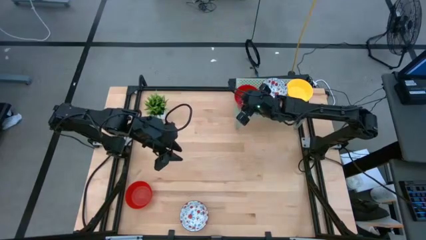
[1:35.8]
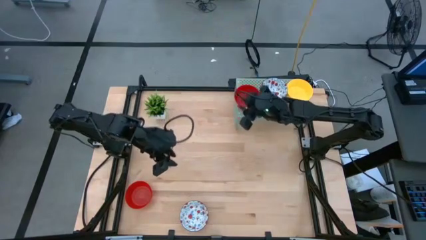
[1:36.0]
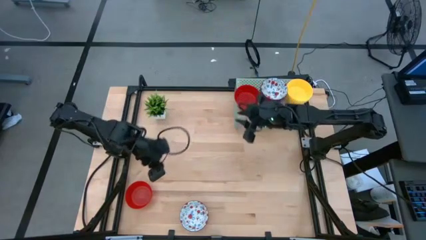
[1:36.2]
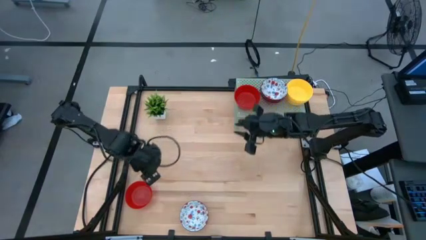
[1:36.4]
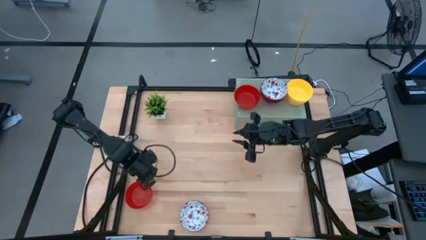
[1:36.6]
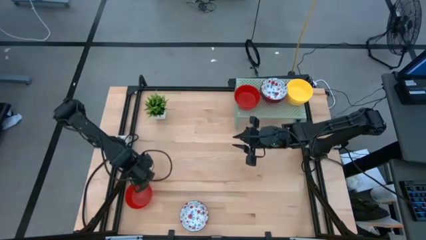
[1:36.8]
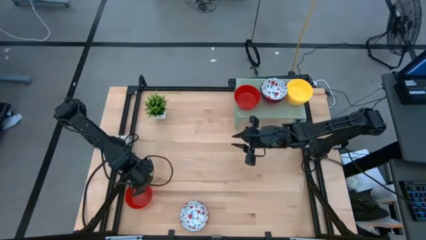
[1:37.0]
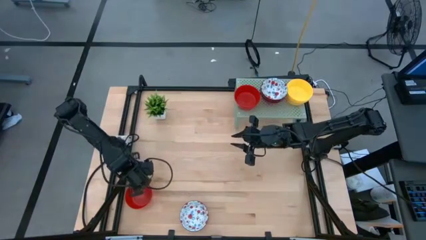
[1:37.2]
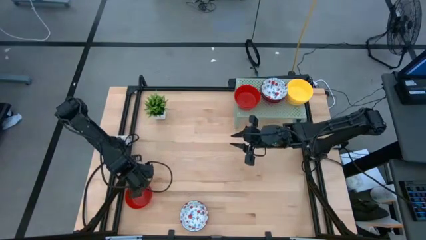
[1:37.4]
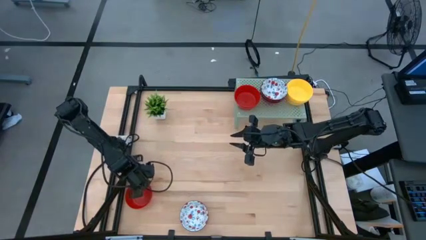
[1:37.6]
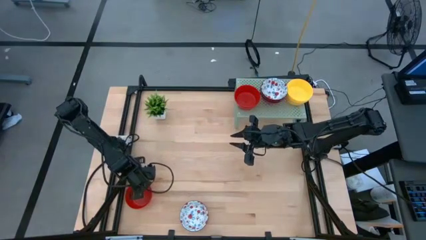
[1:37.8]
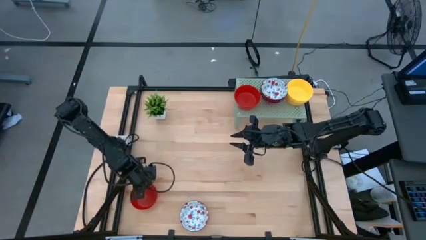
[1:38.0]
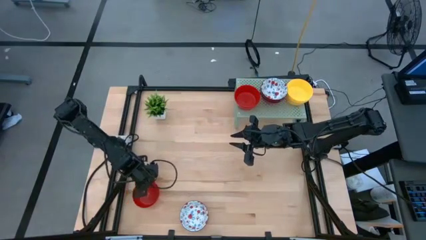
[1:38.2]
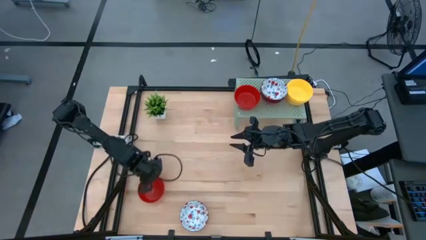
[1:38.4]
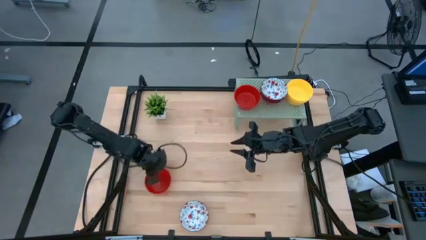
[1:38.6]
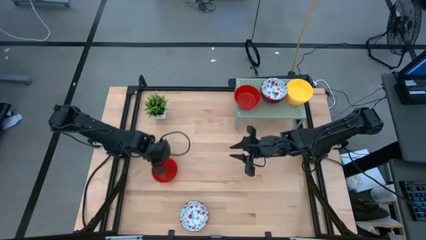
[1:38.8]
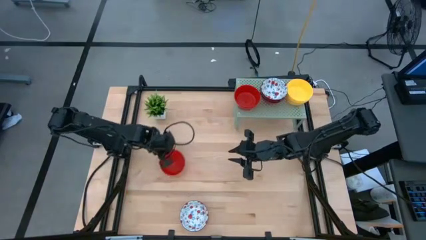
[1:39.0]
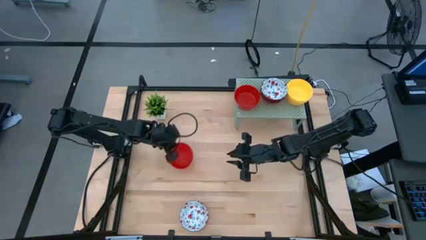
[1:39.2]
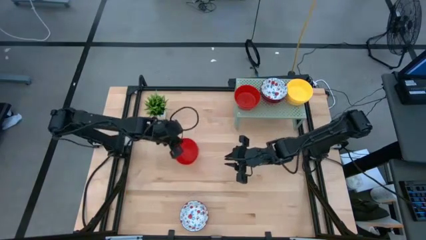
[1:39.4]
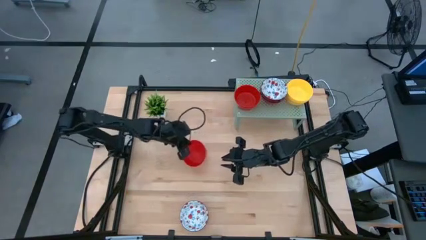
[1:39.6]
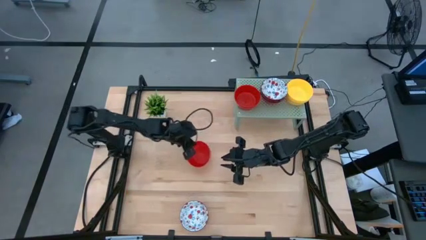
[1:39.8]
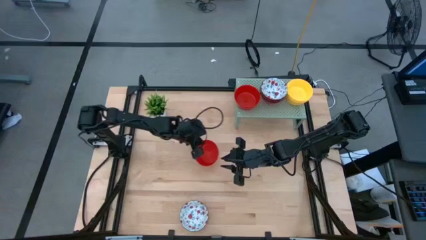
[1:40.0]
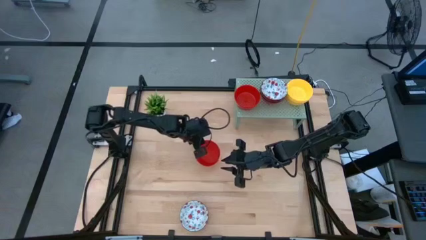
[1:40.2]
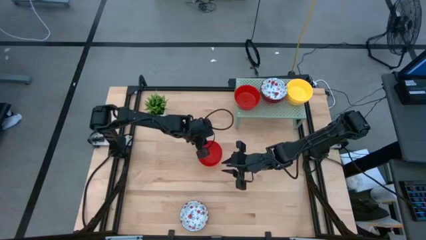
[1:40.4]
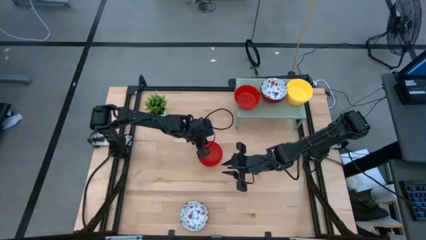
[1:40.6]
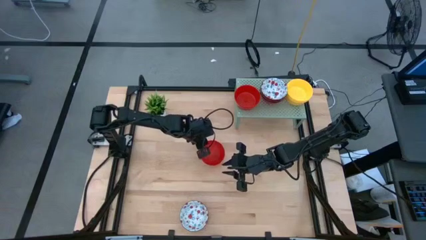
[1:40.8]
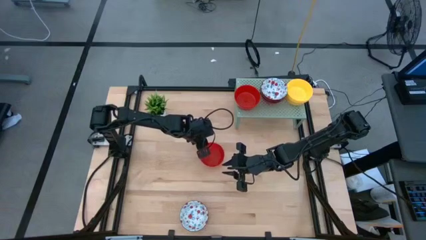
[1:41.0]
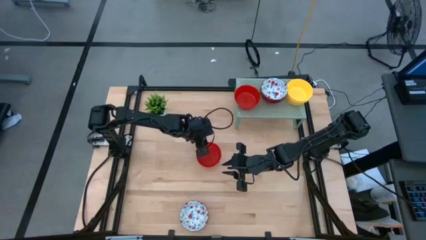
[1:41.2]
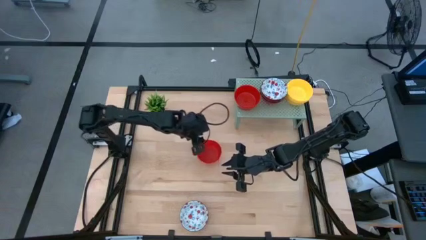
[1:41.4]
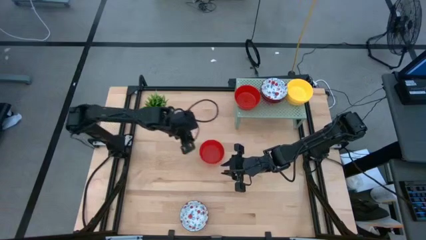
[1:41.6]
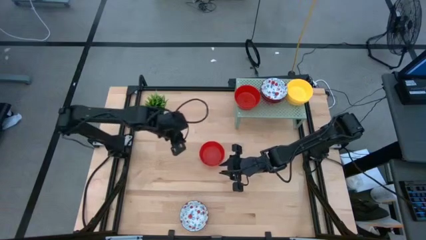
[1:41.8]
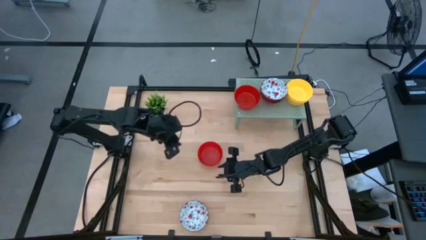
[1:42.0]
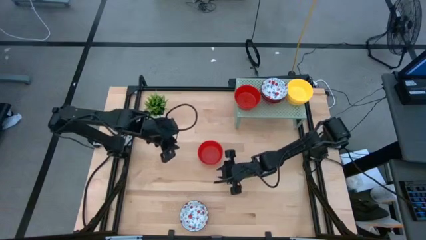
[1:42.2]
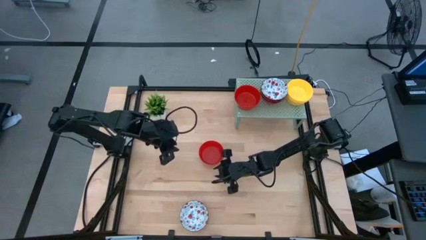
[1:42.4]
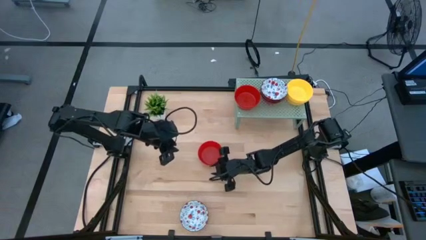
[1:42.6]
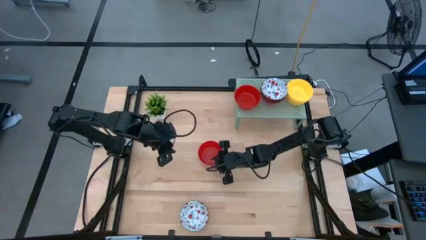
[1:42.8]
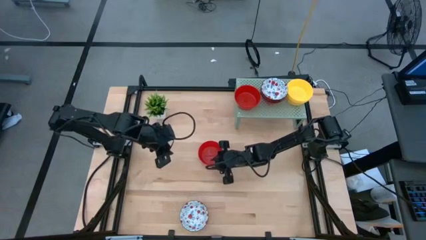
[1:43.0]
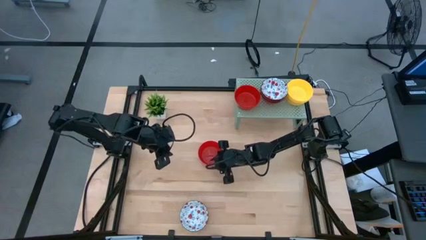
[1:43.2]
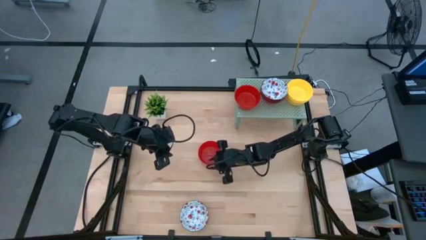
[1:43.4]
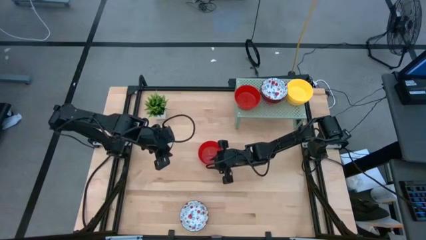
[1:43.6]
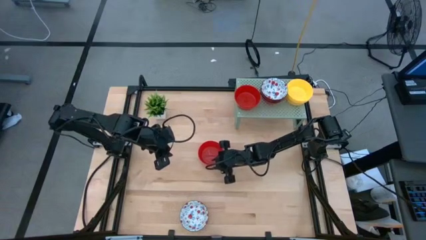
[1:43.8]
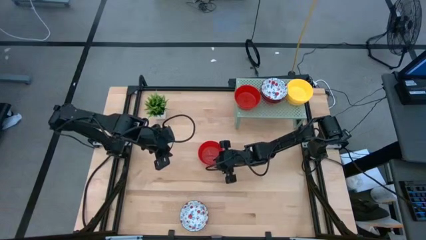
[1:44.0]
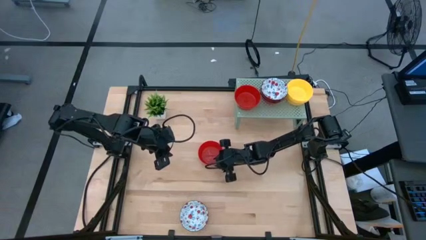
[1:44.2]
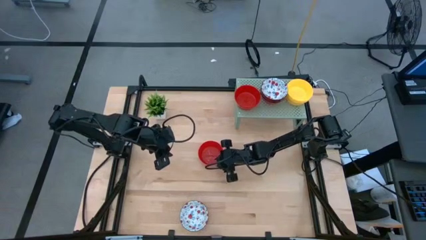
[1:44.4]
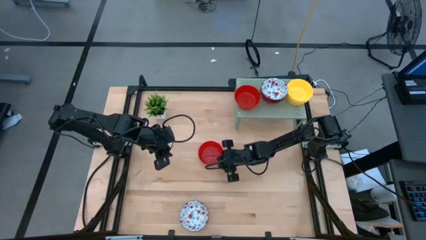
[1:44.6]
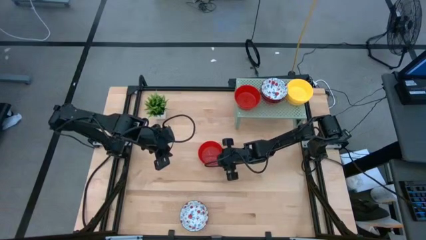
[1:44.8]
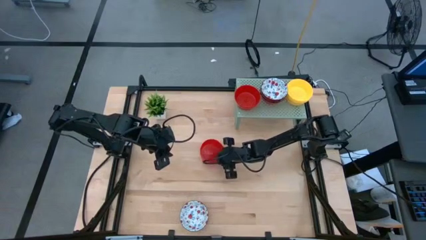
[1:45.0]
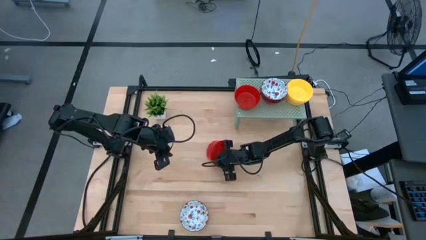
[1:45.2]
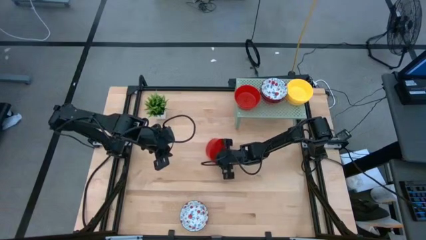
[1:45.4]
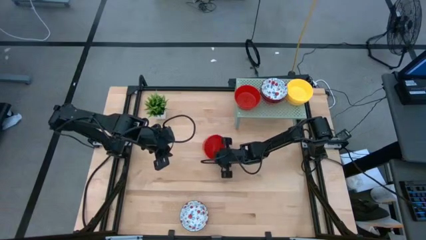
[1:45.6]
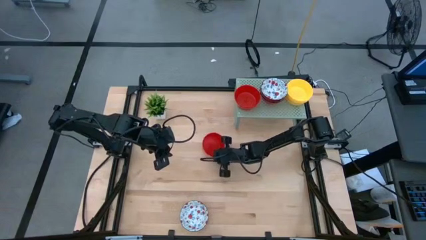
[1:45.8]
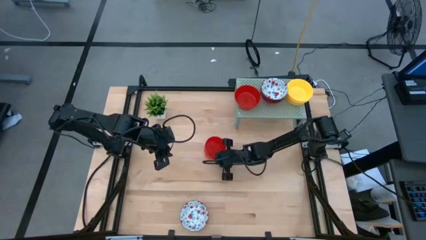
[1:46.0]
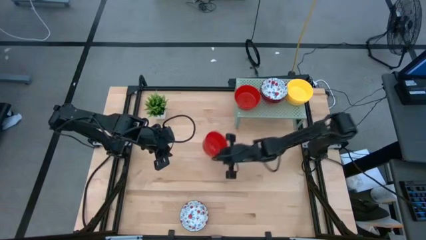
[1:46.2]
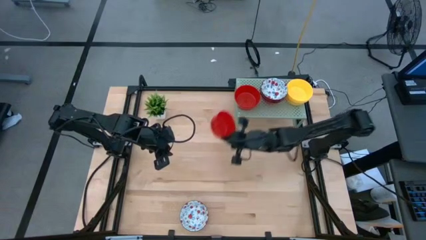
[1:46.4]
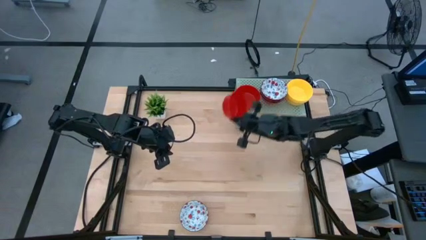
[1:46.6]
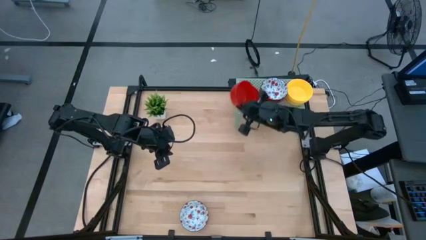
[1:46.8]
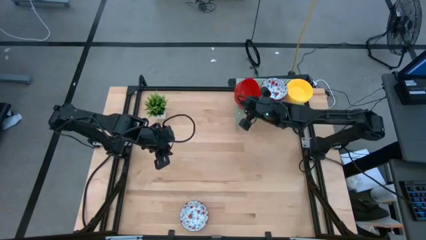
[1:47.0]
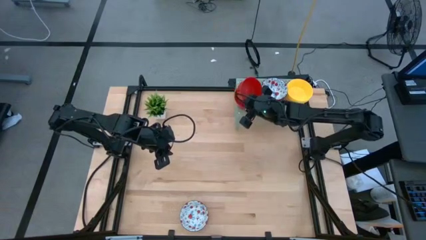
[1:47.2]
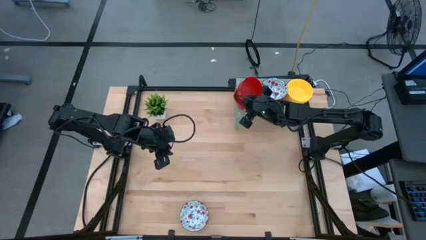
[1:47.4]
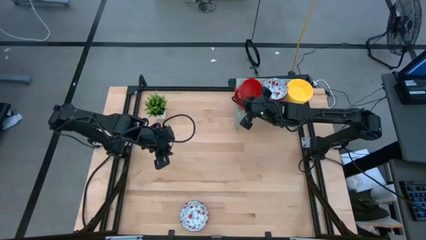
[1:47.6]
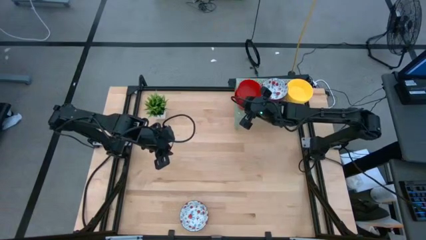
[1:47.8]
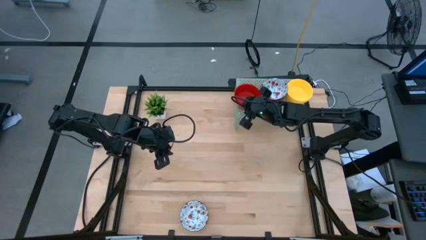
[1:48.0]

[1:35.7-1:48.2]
Task: Pick & Place Mini bowls
Stack the red bowl on the stacked red bowl on the shelf

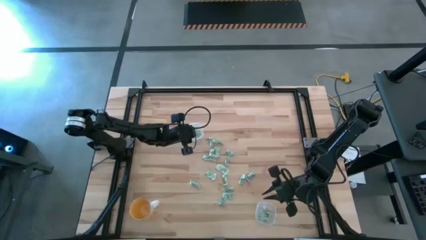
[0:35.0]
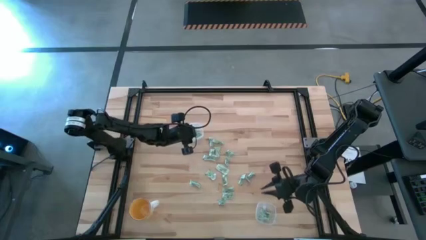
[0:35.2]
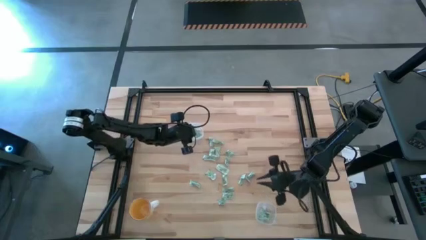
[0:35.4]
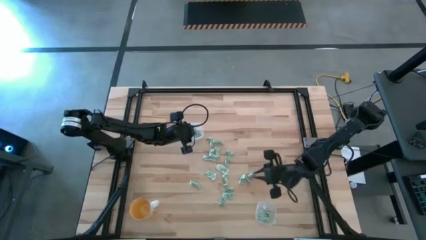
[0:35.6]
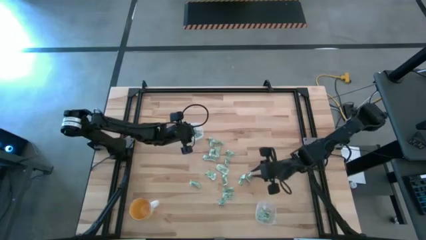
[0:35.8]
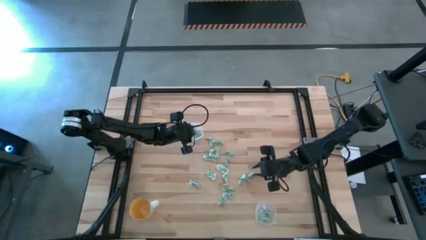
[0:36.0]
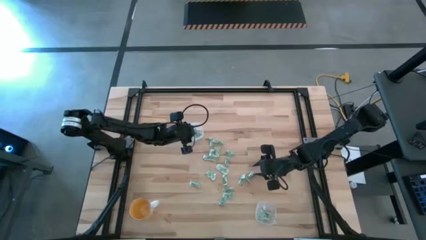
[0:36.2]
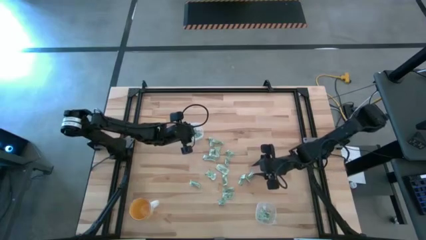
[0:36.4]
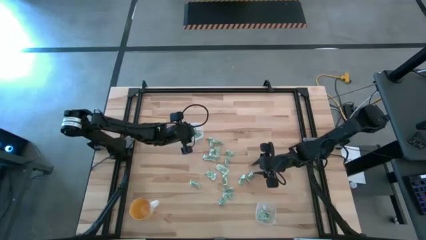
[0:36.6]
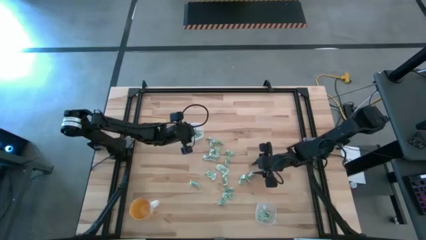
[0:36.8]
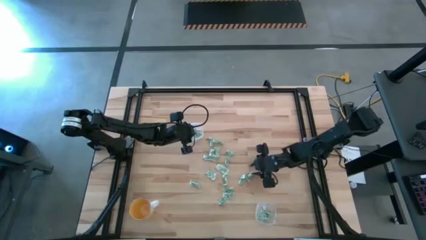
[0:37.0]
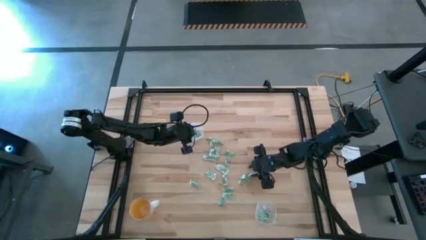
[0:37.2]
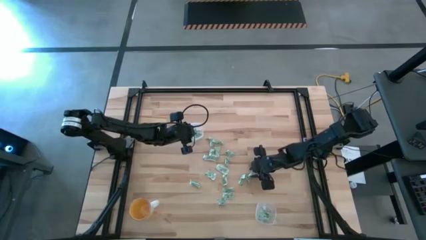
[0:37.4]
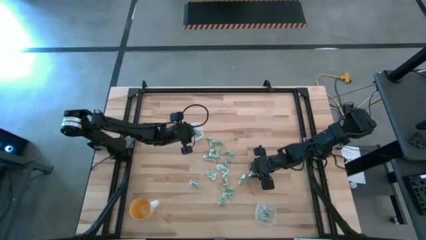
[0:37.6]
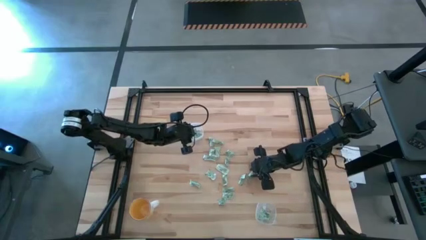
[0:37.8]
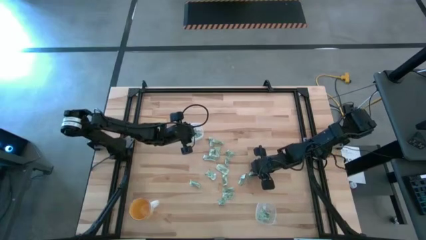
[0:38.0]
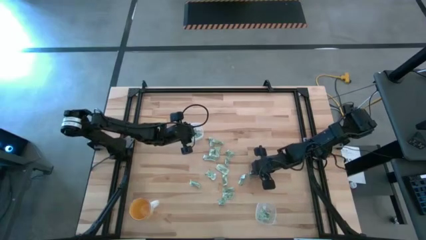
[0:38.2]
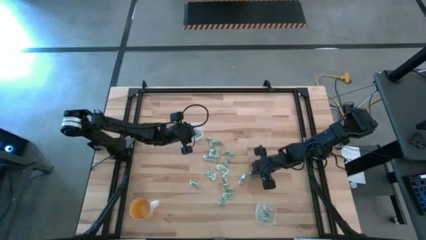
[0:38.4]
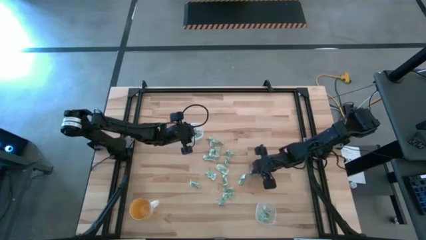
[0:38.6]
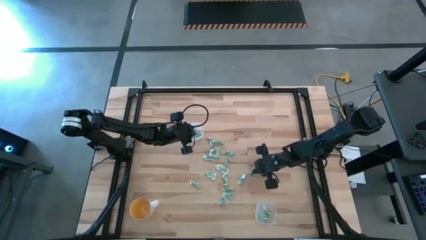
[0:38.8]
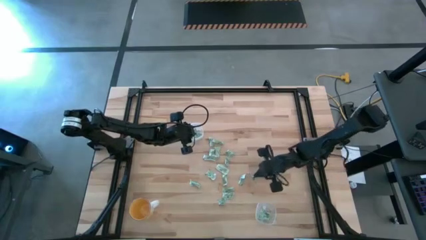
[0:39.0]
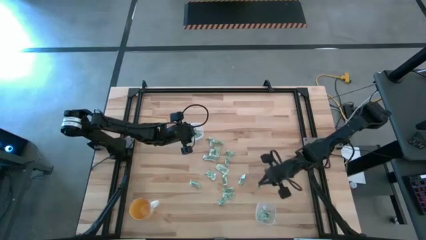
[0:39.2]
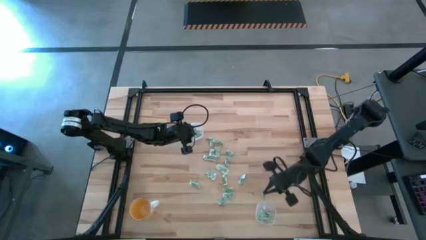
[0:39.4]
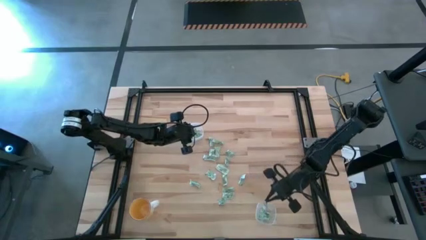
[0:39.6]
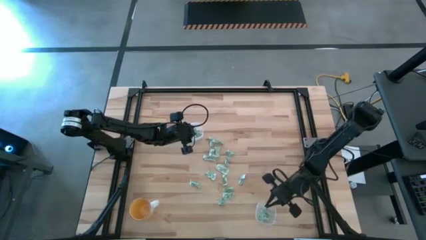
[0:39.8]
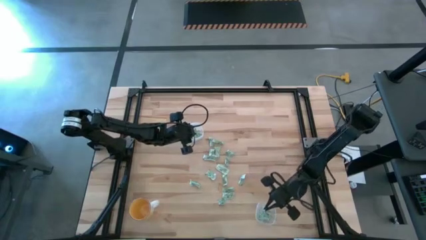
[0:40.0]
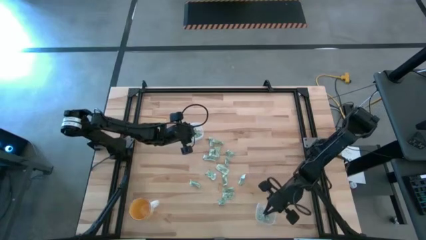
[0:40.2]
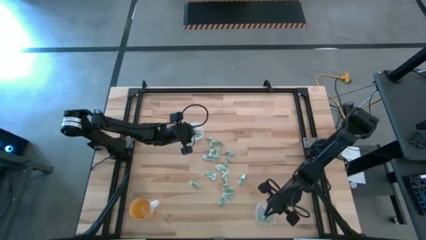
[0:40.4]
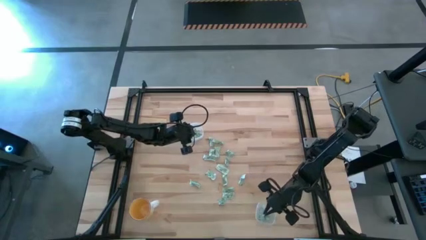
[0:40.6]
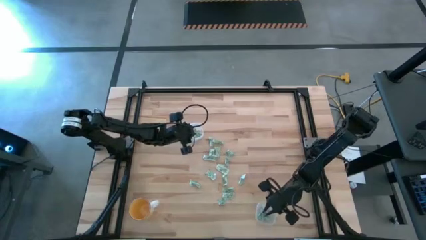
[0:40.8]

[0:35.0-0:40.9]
Task: Pick and place Stevia / Truvia into bins
Put the stevia packet into the bottom transparent container
